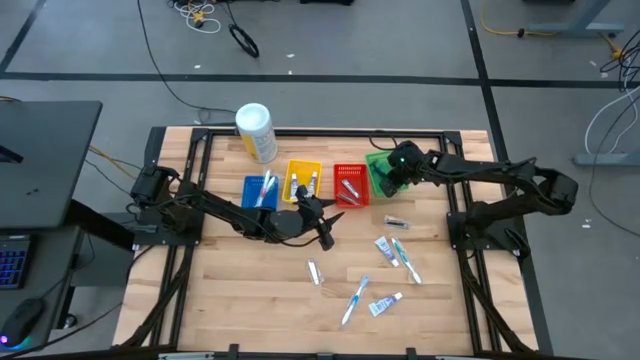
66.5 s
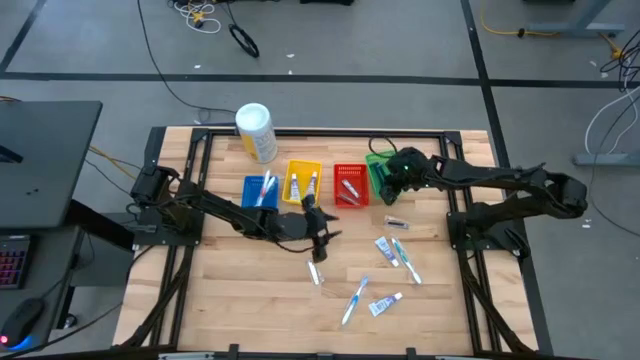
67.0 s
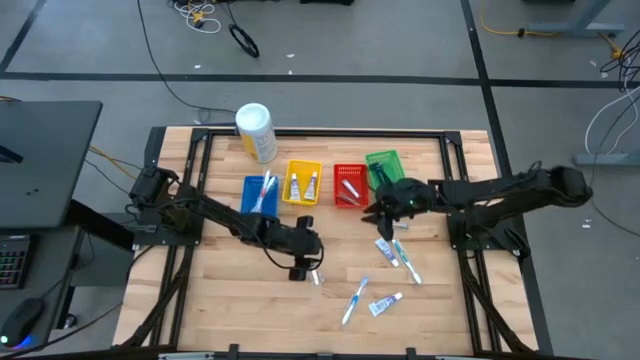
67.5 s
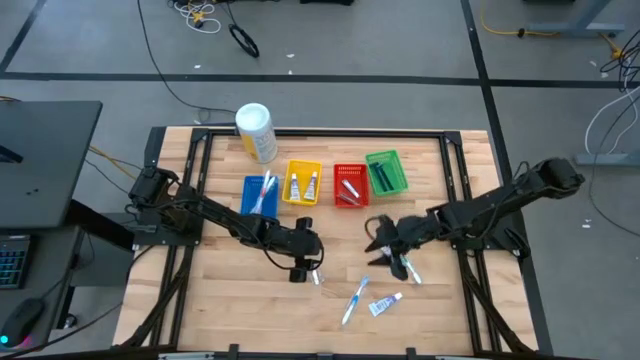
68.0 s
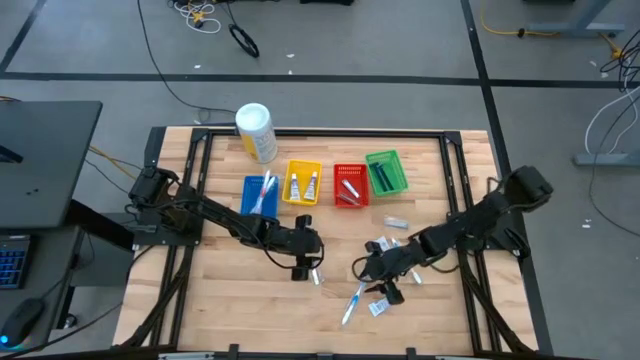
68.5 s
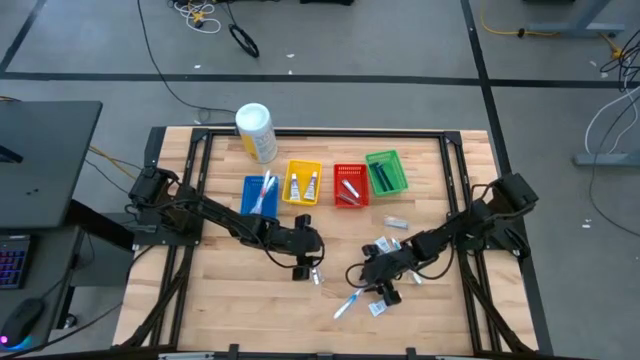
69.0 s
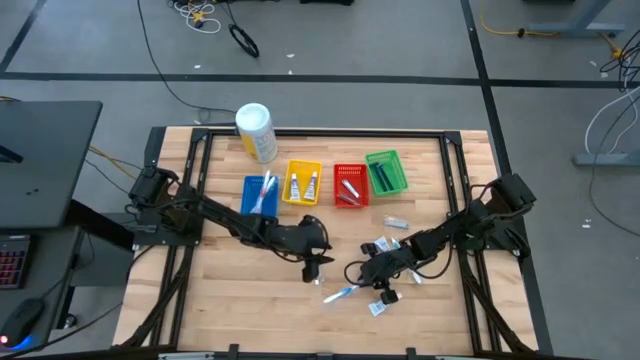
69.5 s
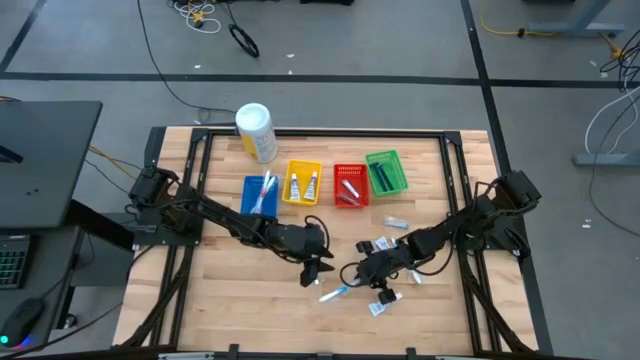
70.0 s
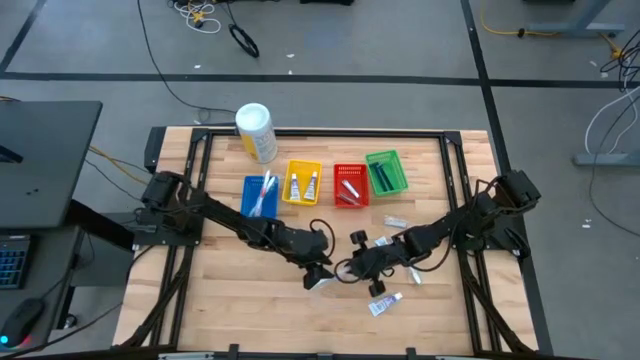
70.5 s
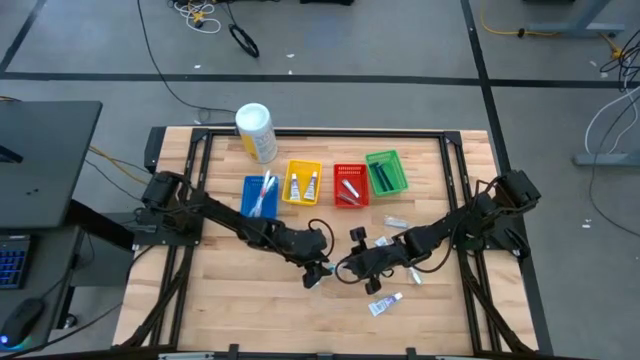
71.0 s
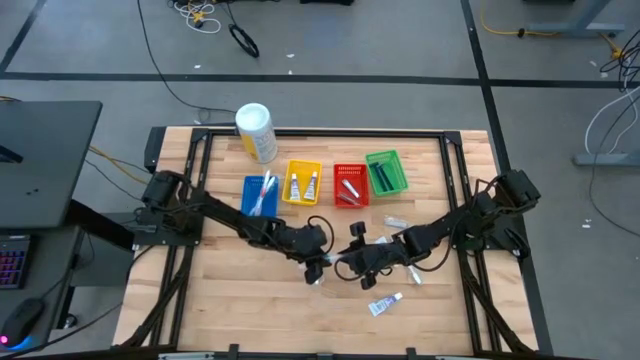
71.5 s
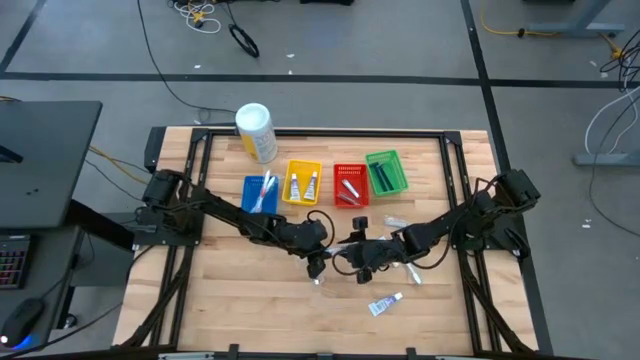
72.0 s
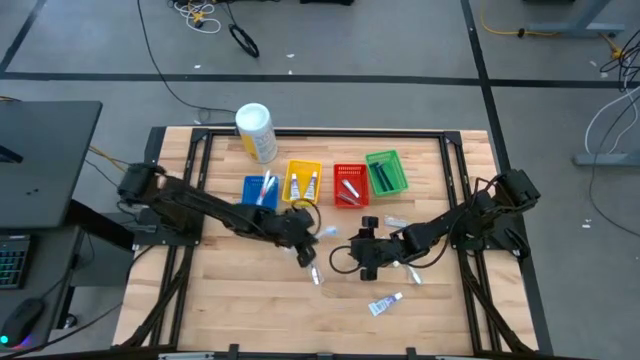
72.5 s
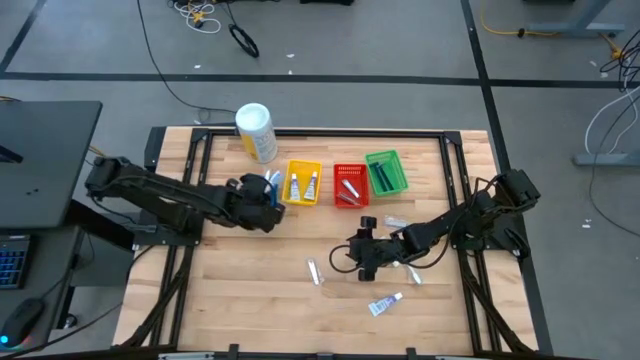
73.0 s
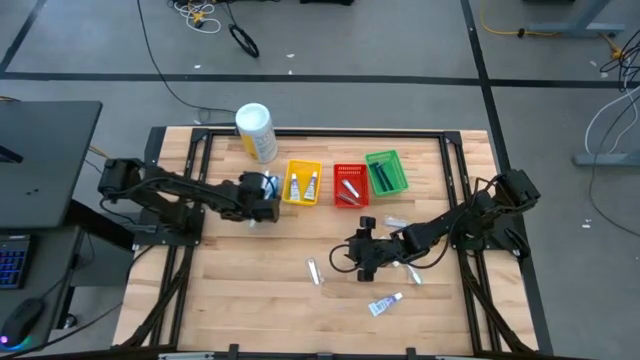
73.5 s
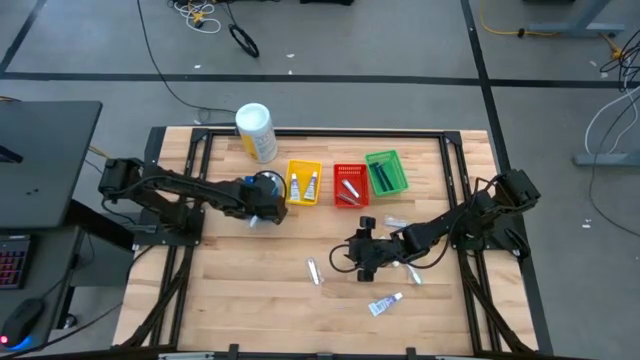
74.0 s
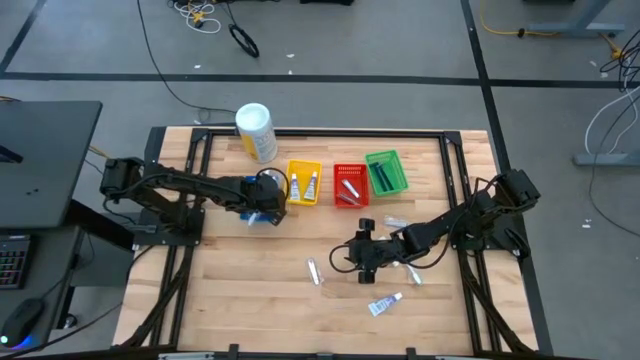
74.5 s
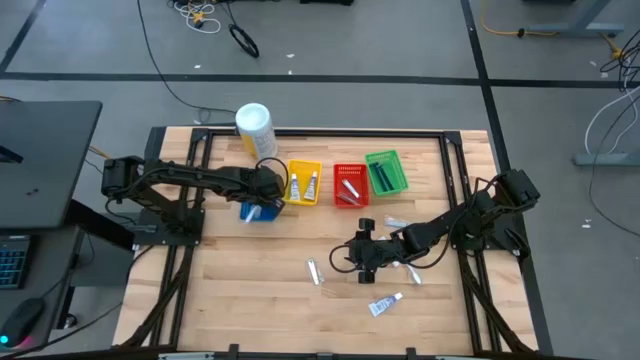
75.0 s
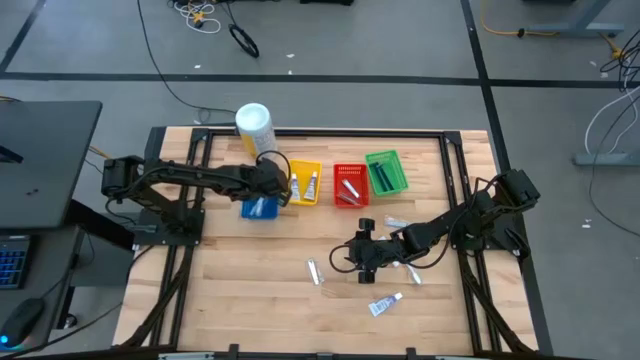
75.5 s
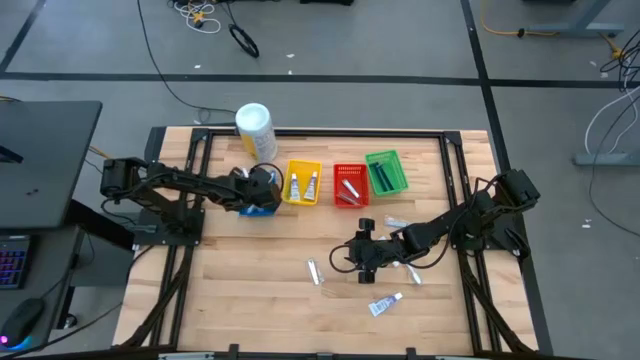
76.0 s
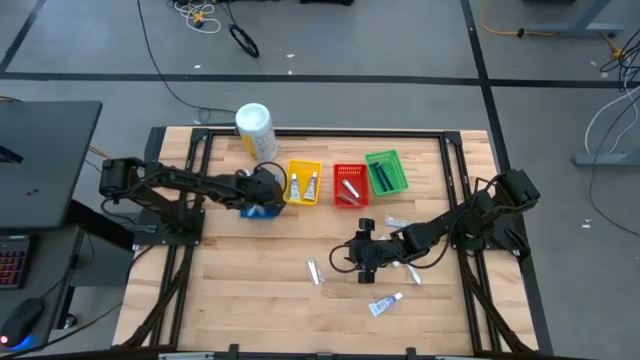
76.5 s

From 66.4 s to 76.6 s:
Task: Pick & Place Travel size toiletries
Put the blue toothbrush into the blue bin

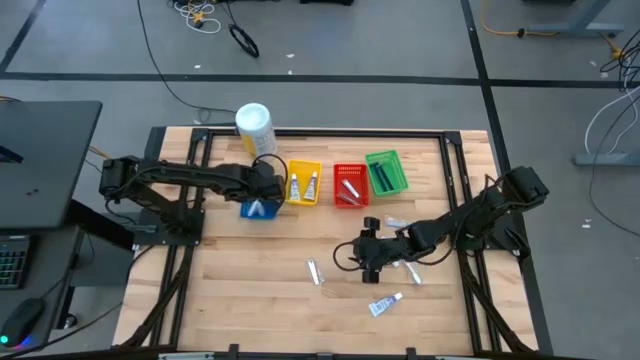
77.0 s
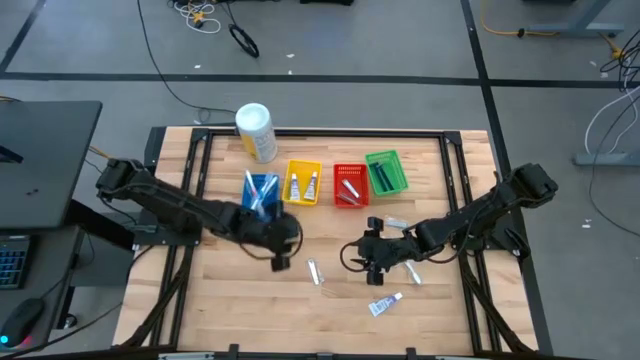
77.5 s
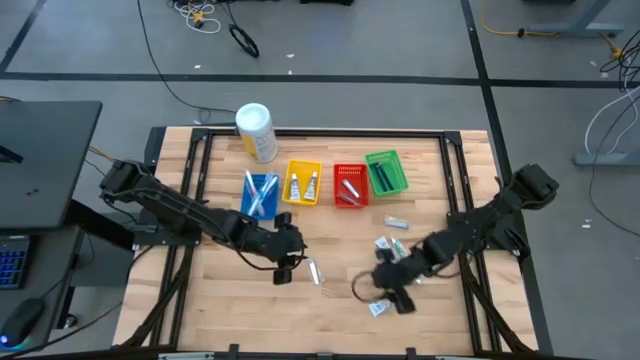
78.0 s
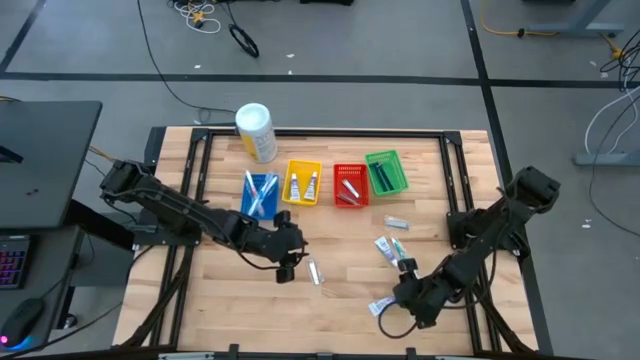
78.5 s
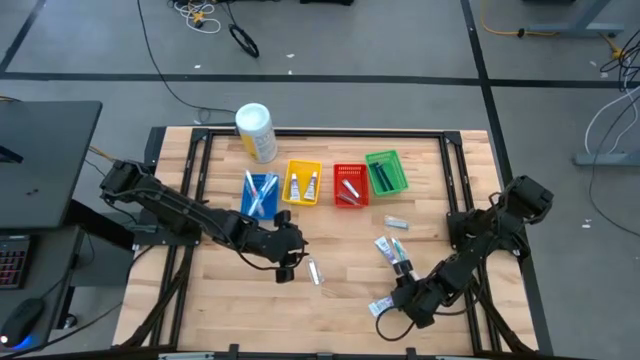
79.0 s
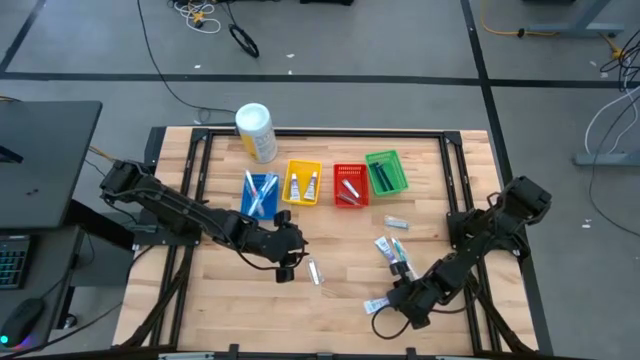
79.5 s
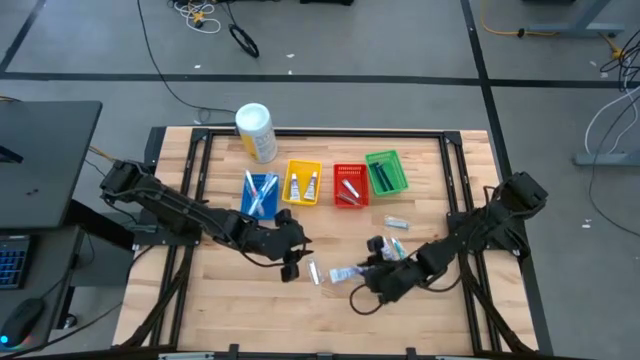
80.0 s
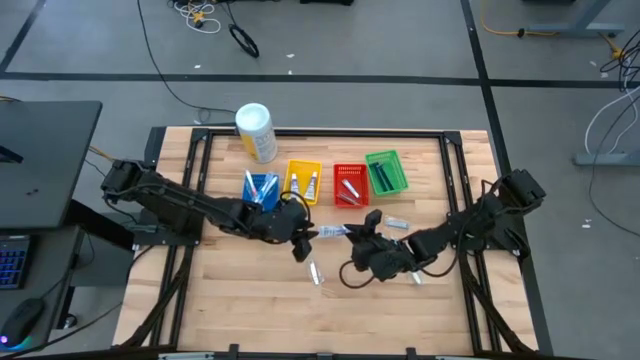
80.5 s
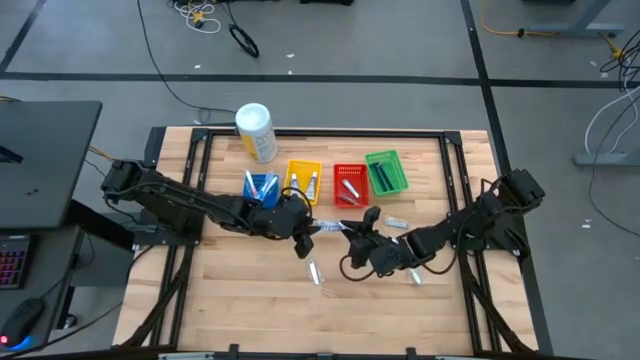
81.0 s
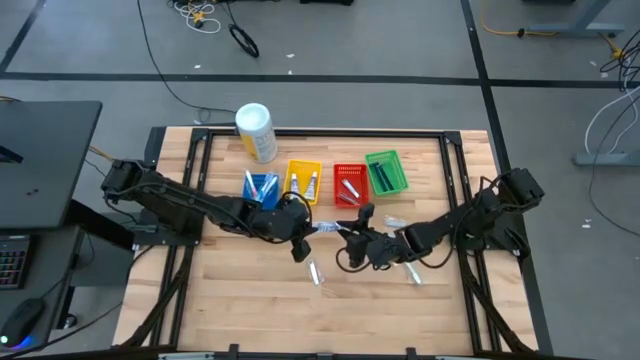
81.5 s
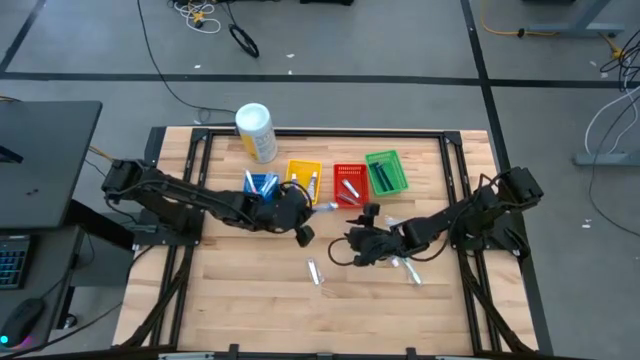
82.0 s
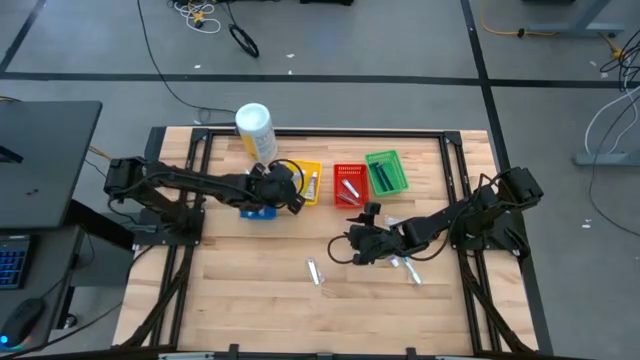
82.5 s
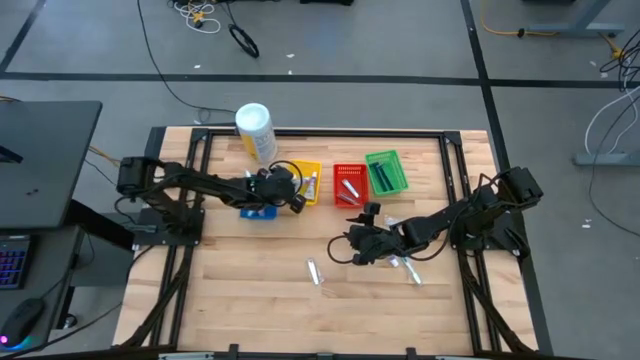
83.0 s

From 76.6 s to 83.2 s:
Put the white toothpaste into the yellow bin

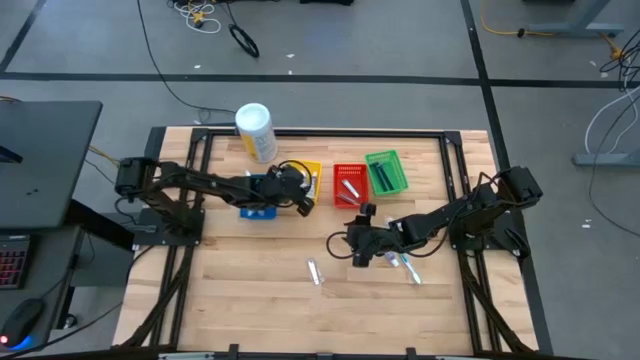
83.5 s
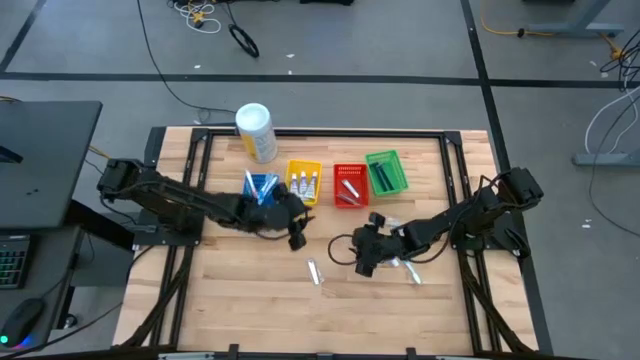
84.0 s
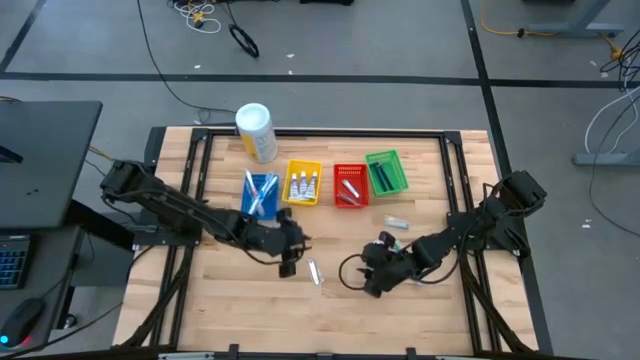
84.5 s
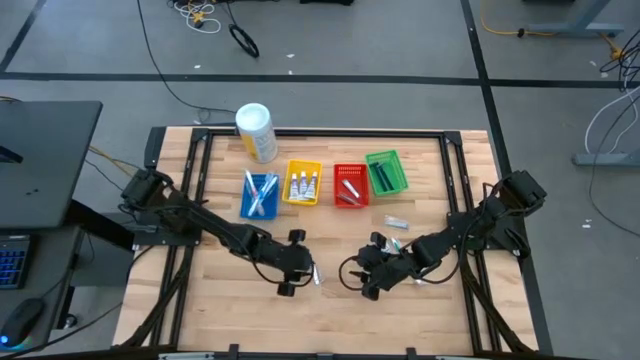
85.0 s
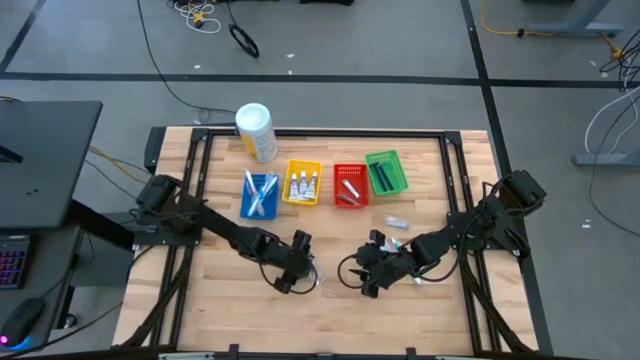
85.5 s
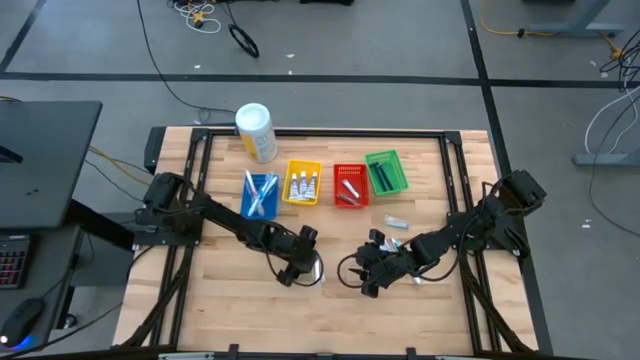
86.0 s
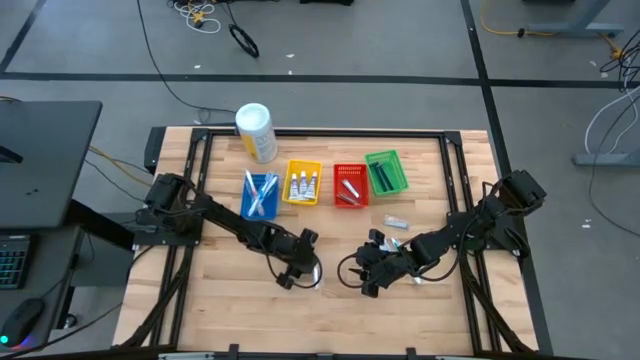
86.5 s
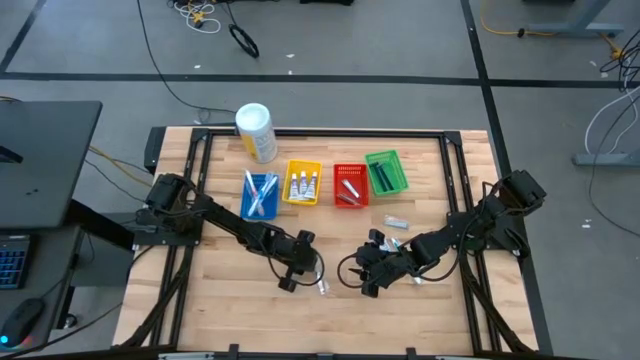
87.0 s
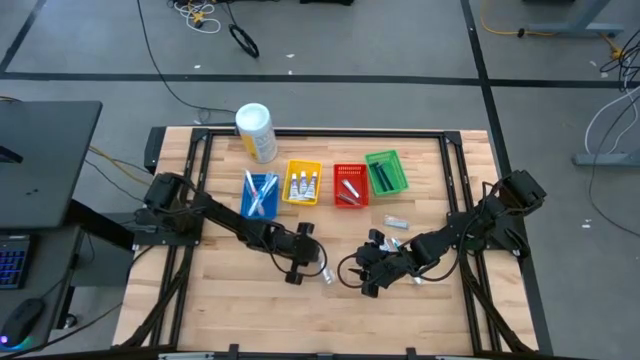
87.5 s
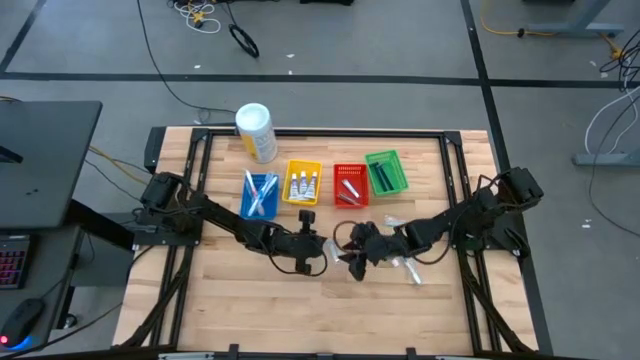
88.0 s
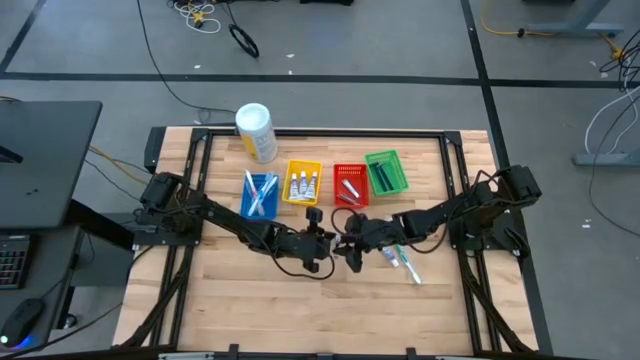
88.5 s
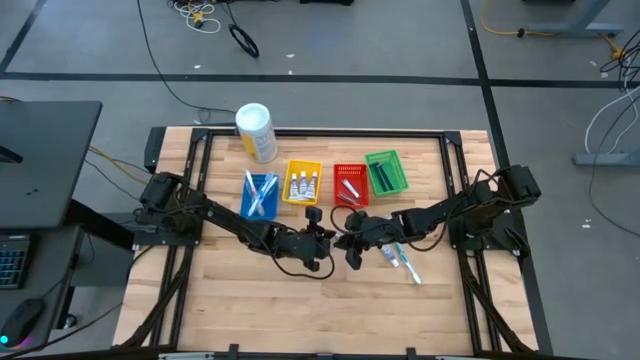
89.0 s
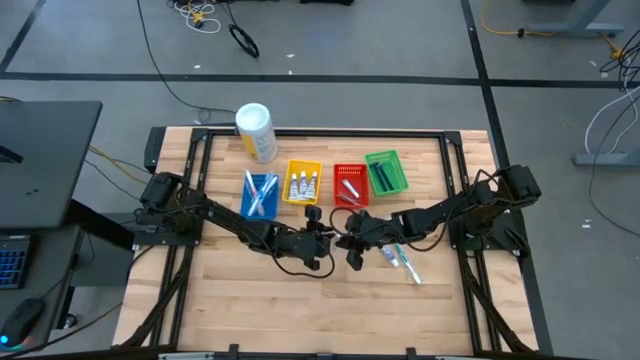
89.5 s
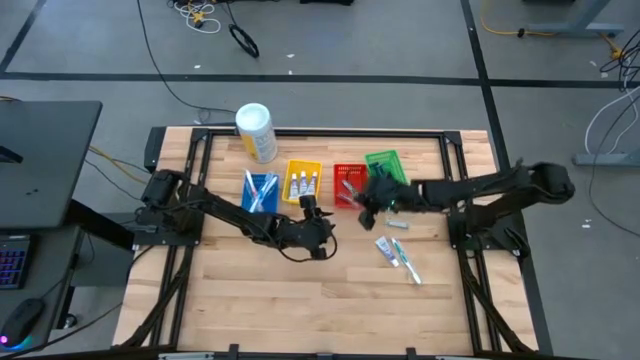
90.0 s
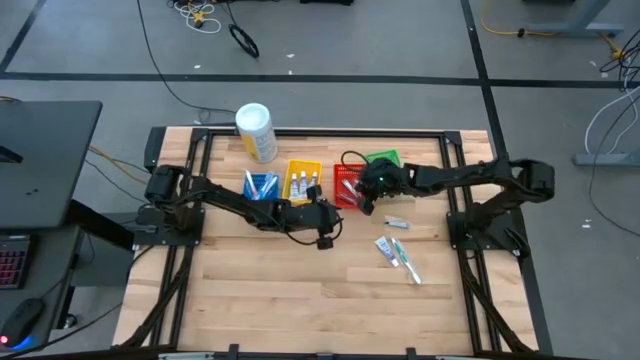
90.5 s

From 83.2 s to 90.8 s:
Put the silver nail cutter into the red bin
